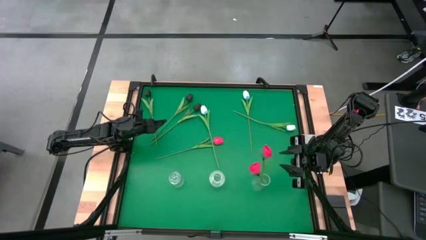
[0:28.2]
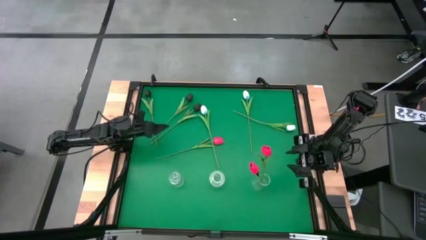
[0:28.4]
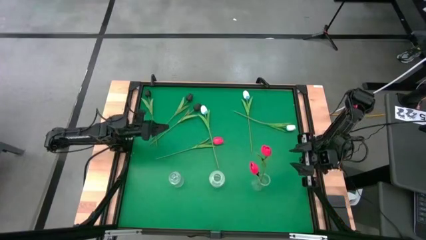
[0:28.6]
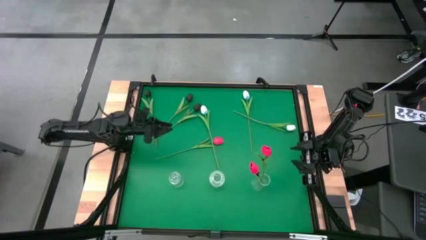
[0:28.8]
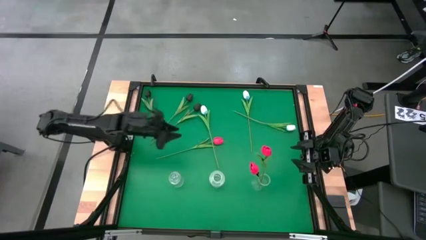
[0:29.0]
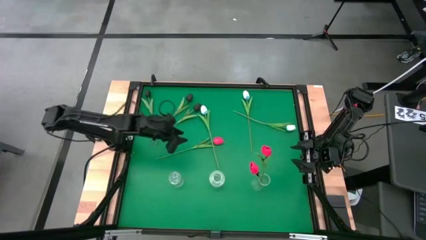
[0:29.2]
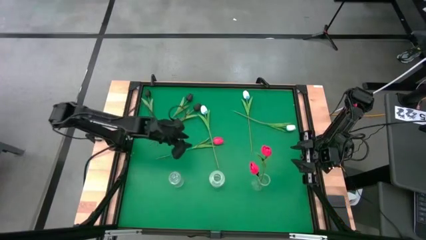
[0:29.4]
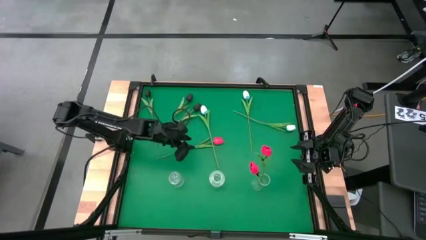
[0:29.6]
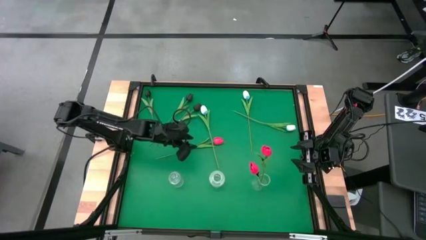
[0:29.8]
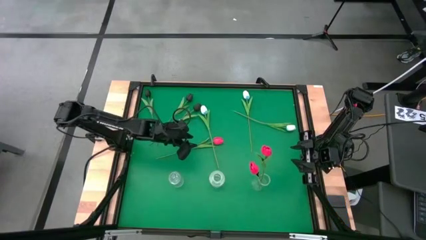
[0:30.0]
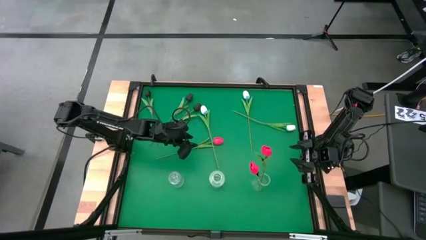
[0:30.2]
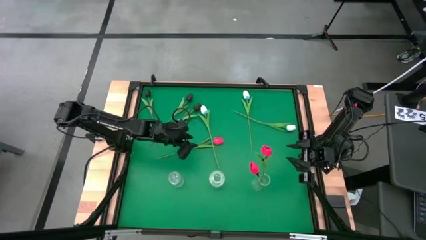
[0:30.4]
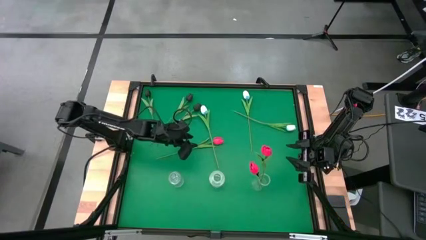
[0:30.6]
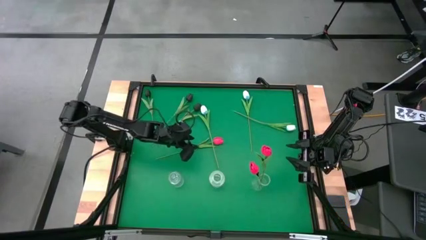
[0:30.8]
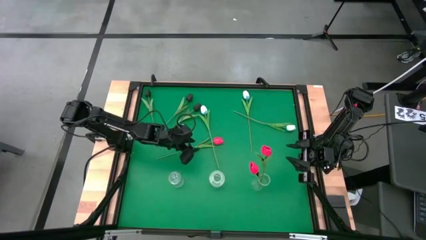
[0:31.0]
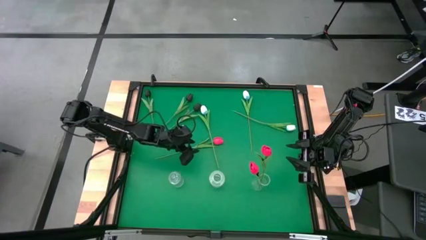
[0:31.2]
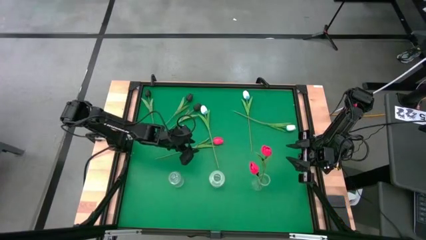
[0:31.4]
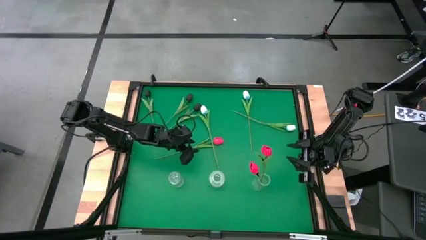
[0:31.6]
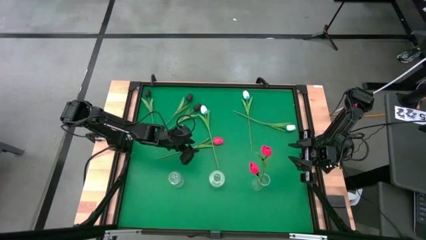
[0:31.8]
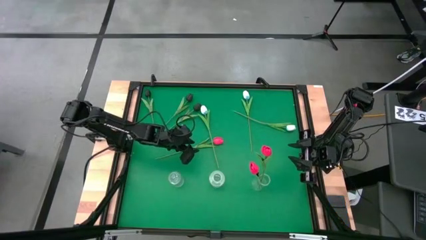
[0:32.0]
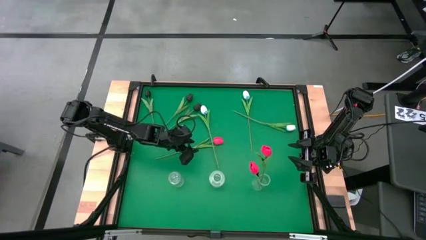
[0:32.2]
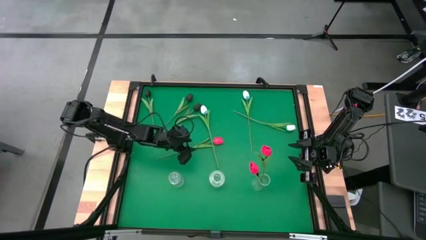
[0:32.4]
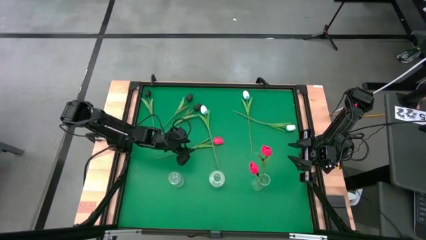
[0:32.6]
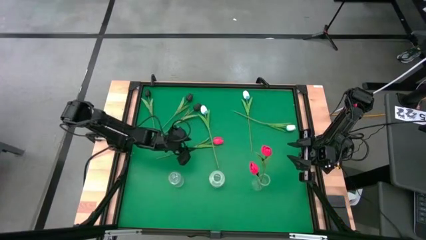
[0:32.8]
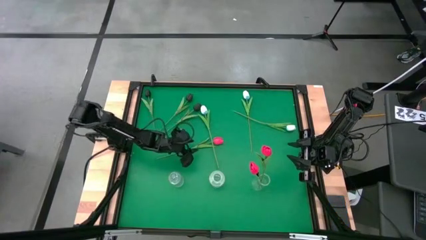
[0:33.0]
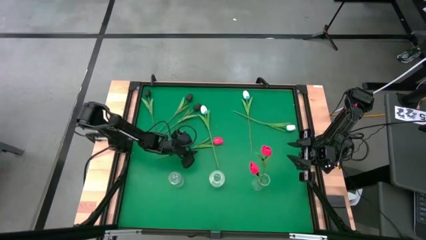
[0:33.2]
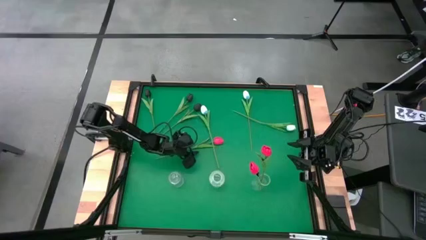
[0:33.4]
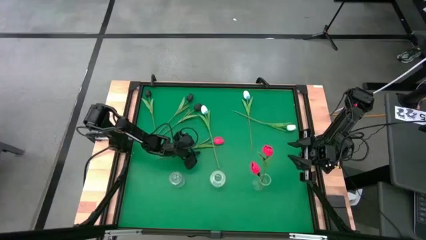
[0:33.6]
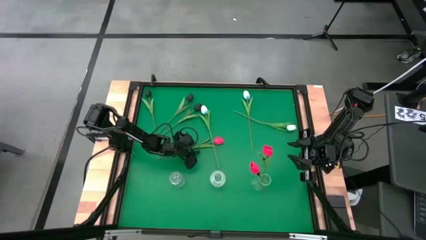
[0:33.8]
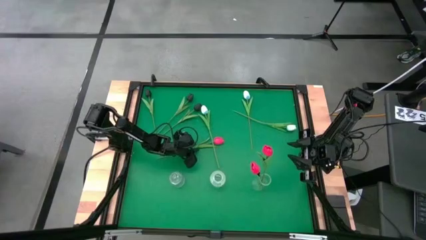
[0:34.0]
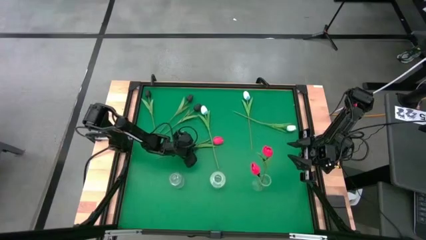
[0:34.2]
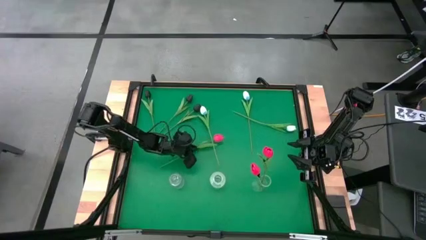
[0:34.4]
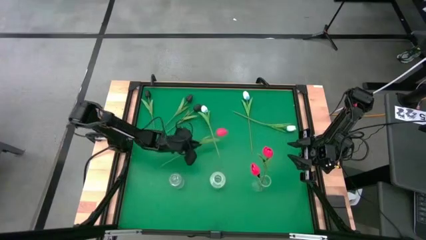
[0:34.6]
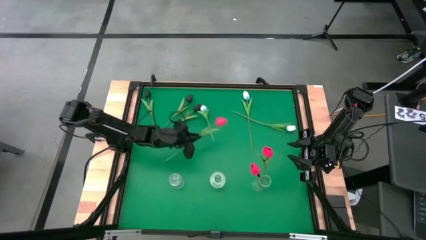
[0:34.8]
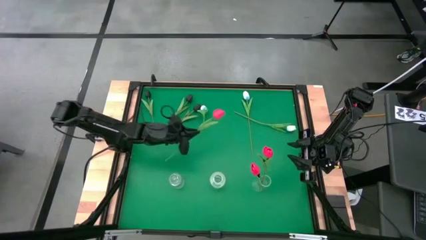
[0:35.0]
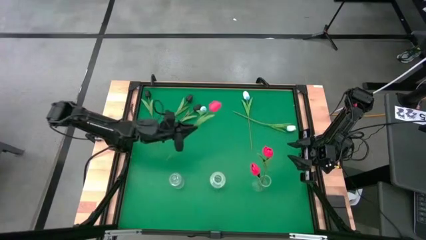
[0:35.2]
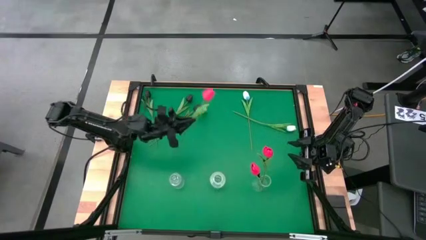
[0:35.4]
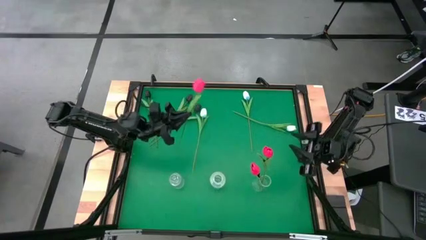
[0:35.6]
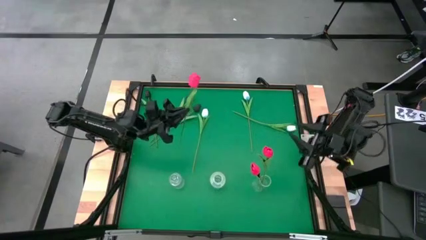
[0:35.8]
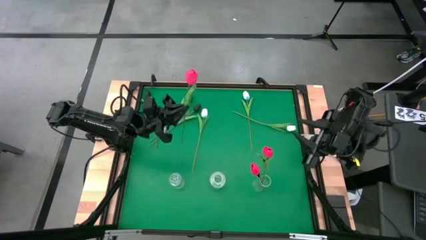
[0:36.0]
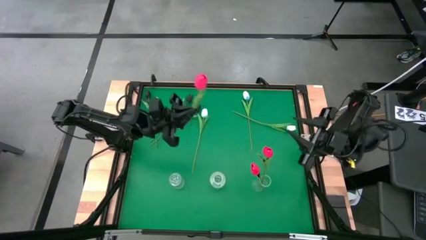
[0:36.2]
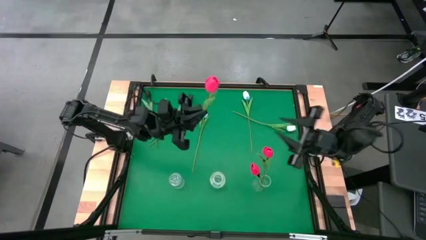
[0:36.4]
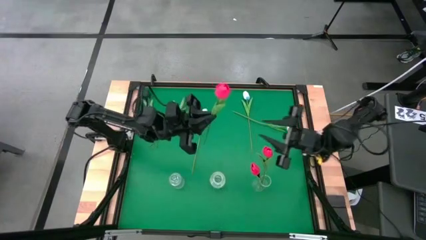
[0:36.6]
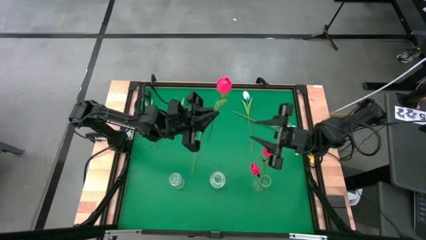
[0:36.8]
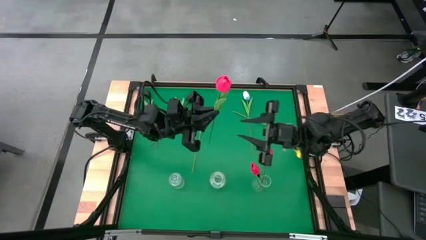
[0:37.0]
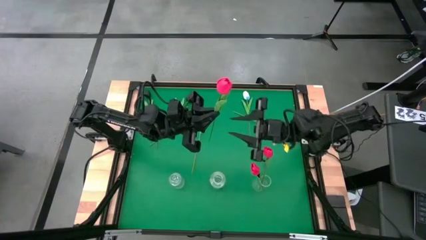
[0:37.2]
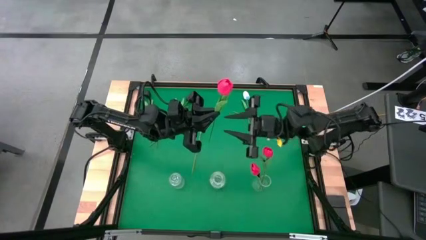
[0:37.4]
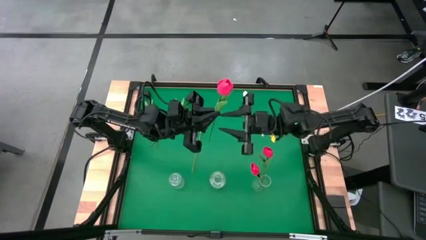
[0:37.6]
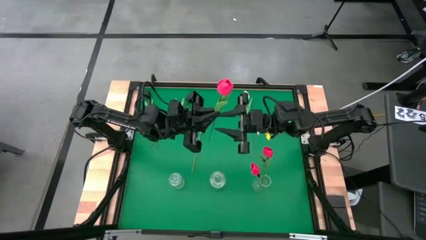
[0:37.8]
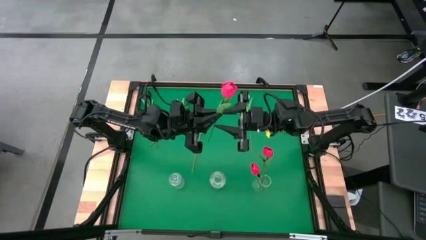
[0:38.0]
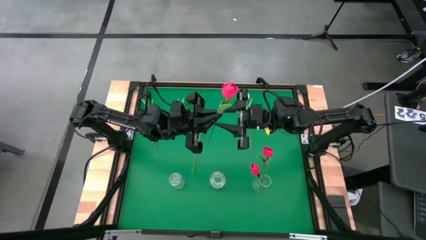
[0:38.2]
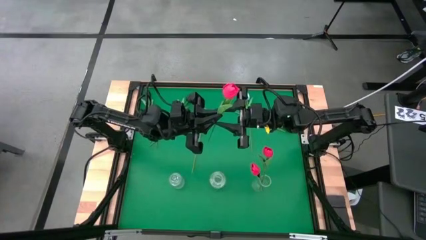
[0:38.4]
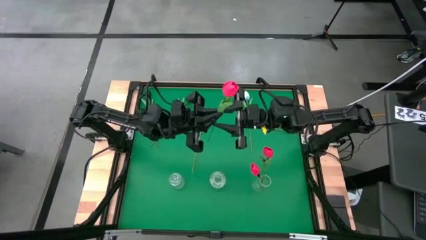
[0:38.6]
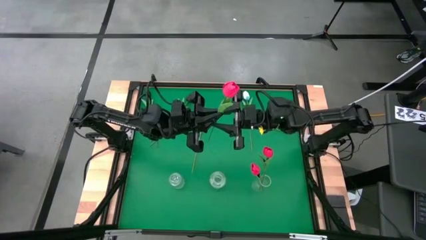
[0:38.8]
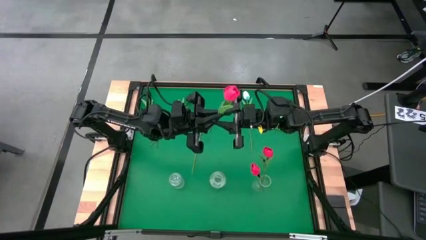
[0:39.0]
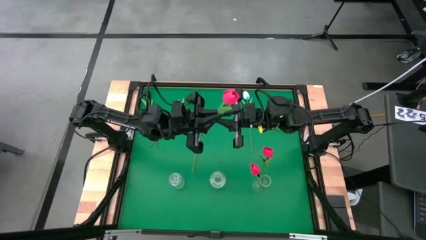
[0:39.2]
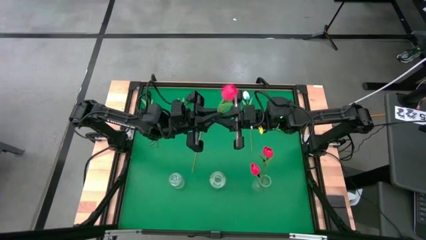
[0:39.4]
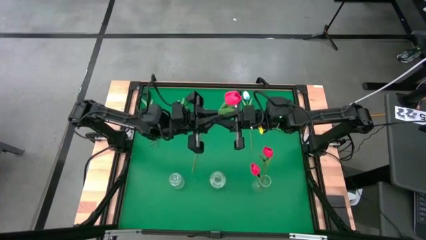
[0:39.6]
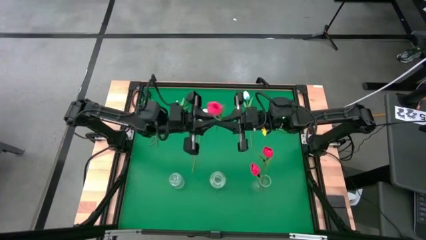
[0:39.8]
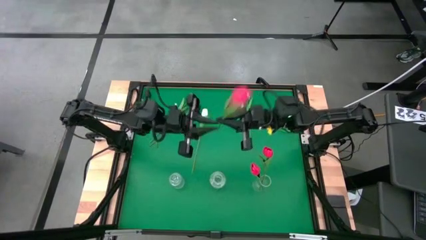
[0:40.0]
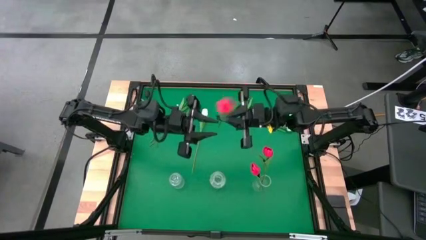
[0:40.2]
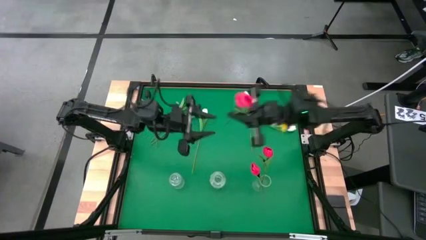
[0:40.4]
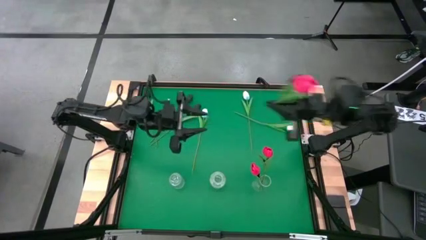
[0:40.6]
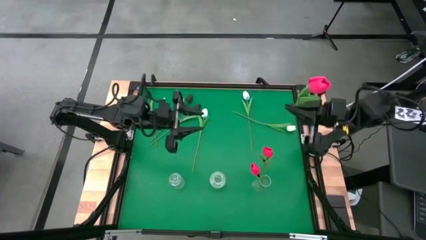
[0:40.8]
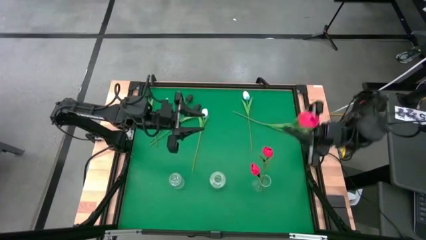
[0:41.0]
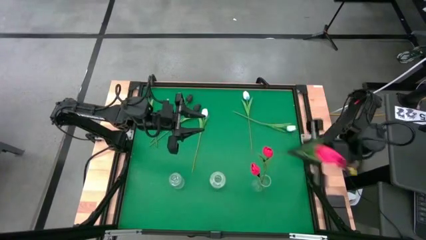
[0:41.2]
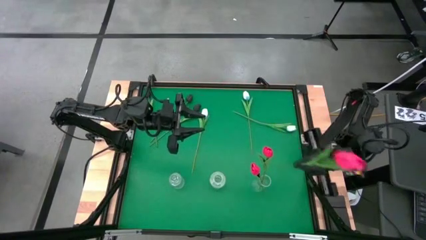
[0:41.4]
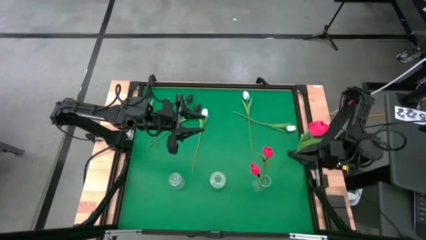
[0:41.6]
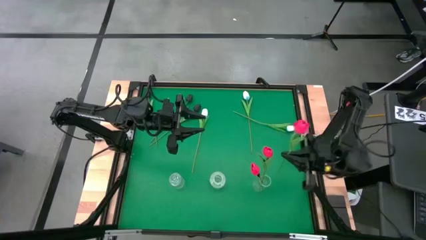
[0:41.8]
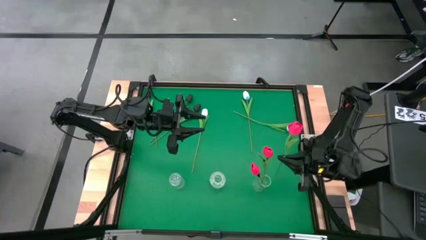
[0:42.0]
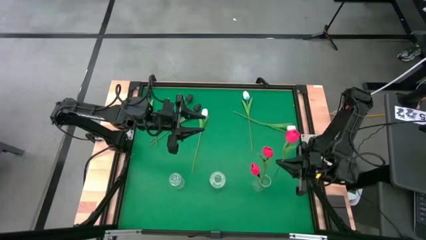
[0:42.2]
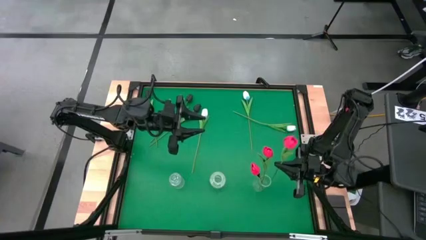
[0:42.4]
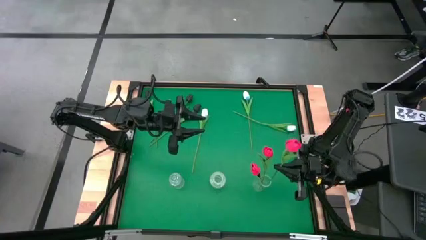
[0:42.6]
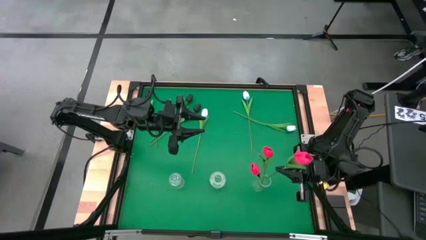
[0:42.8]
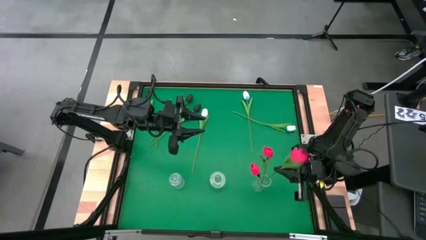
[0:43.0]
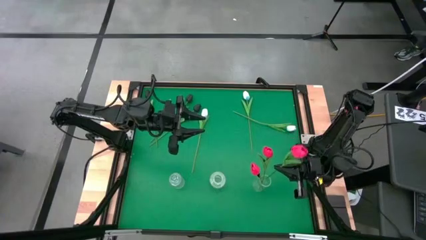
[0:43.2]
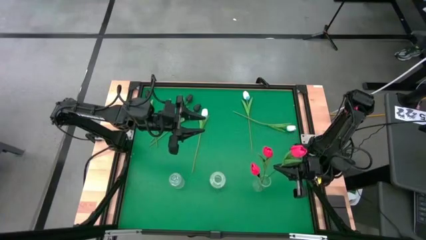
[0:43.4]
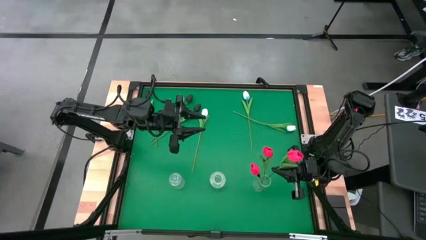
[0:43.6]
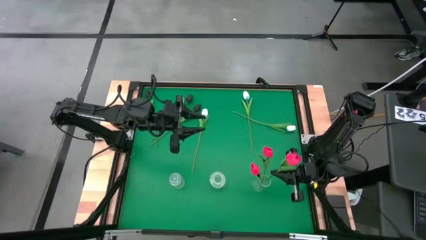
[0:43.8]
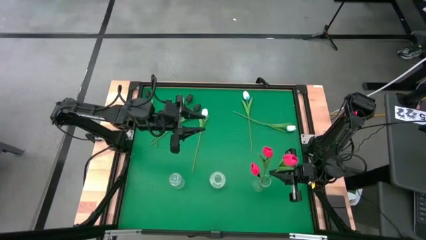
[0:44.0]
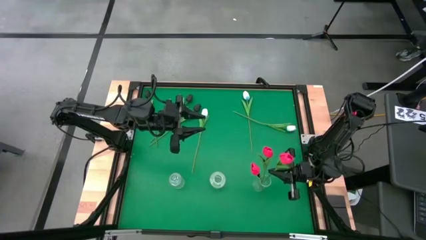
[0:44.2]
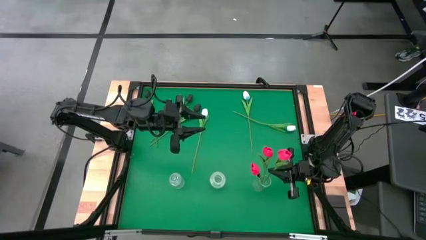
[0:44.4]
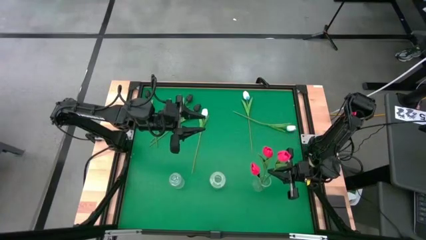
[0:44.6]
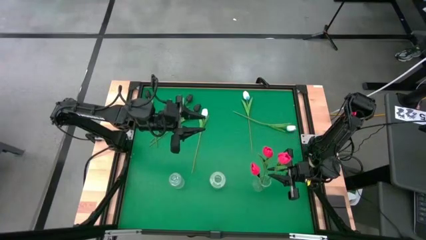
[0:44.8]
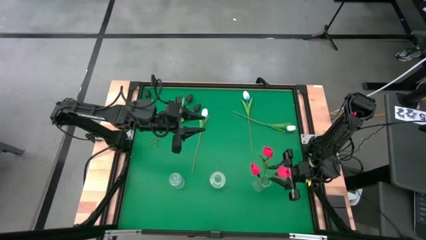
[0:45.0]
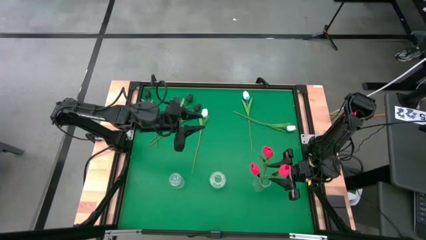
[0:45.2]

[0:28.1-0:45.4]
Task: Sort flowers into vase by color
Put the pink tulip into the transparent vase
